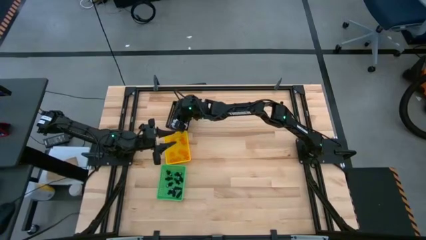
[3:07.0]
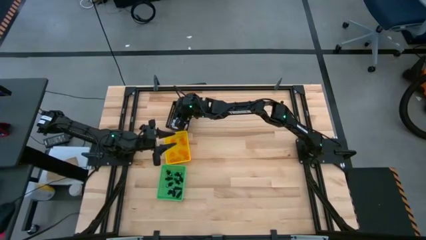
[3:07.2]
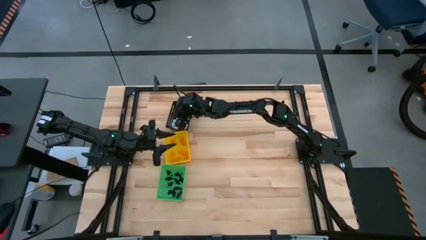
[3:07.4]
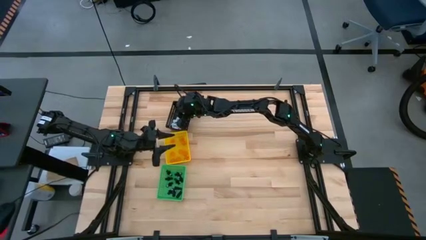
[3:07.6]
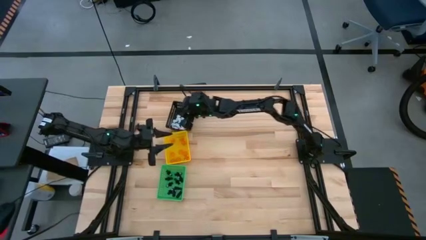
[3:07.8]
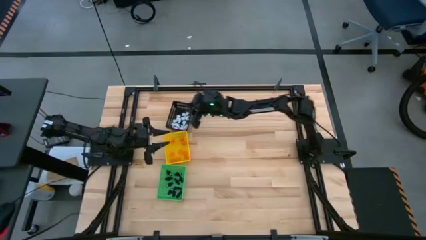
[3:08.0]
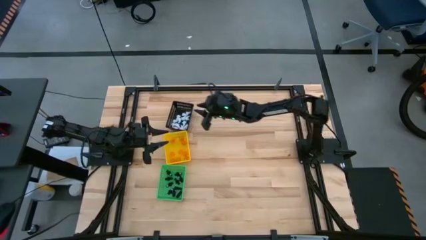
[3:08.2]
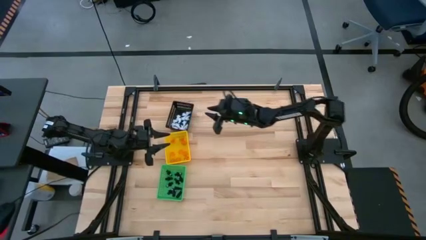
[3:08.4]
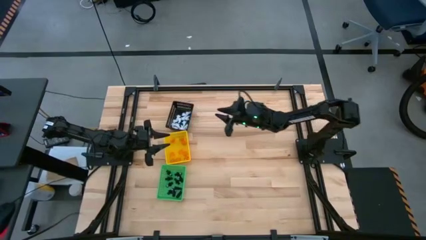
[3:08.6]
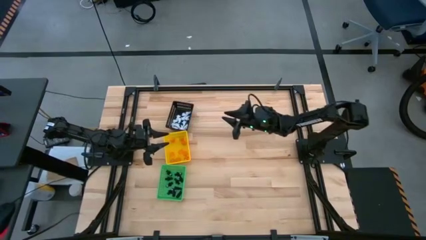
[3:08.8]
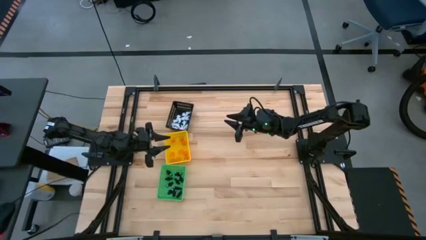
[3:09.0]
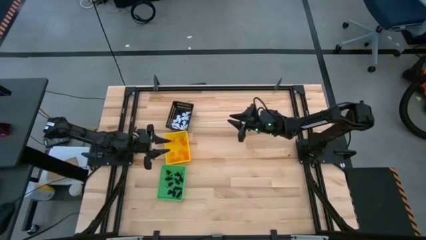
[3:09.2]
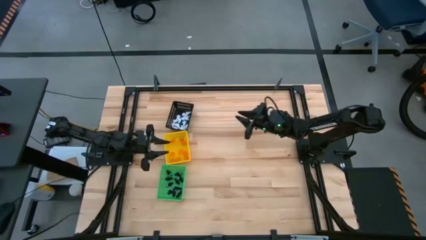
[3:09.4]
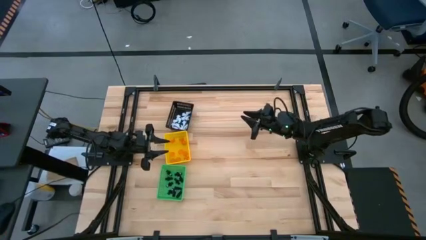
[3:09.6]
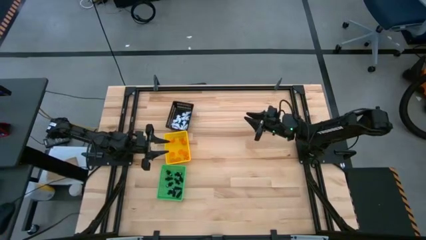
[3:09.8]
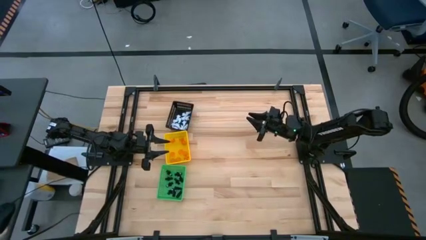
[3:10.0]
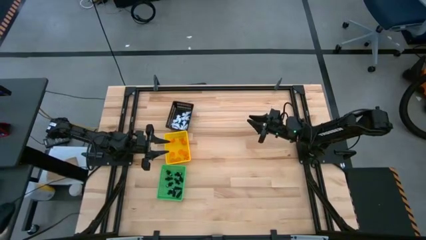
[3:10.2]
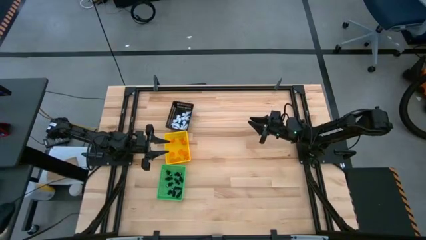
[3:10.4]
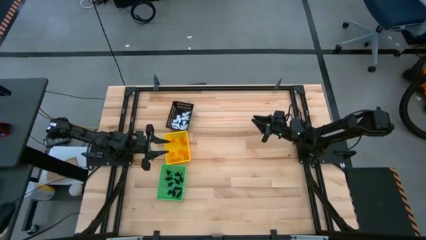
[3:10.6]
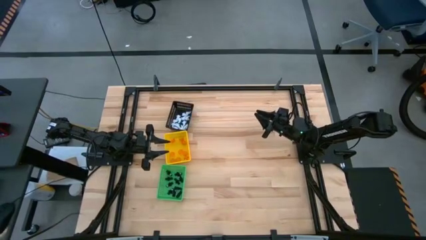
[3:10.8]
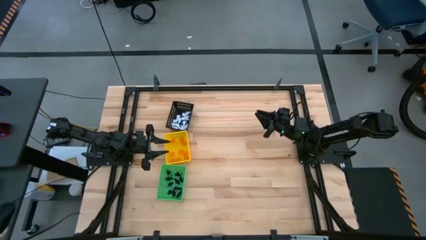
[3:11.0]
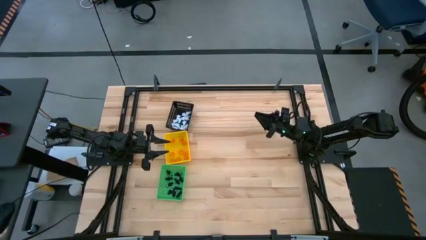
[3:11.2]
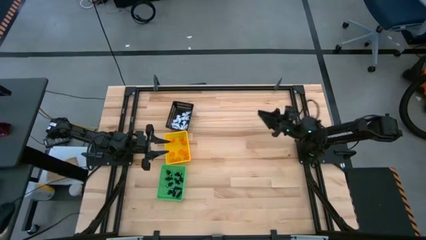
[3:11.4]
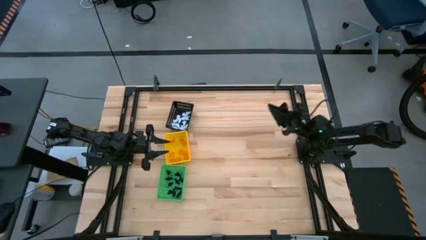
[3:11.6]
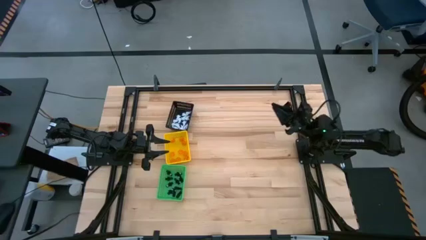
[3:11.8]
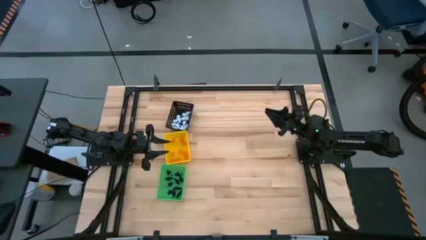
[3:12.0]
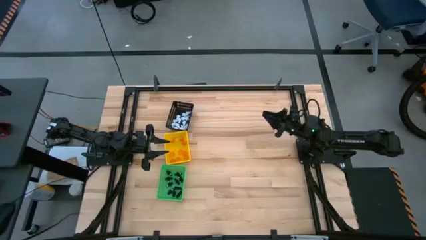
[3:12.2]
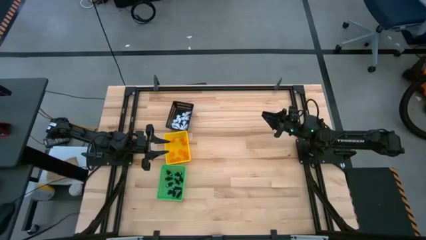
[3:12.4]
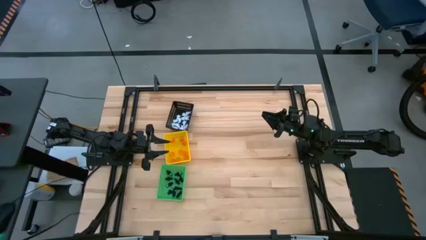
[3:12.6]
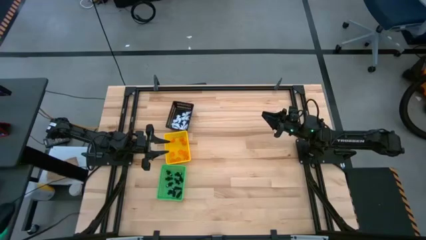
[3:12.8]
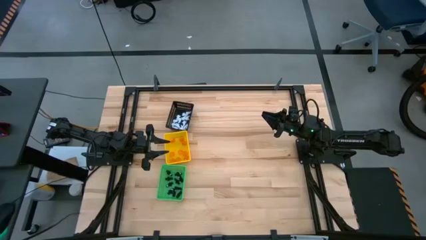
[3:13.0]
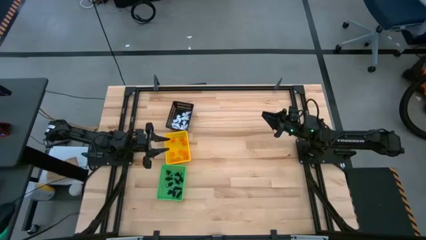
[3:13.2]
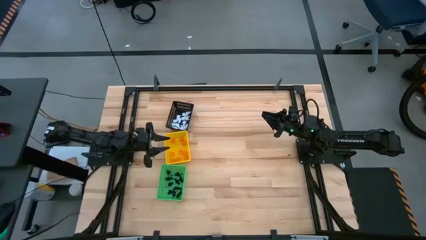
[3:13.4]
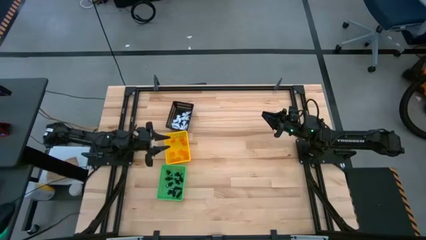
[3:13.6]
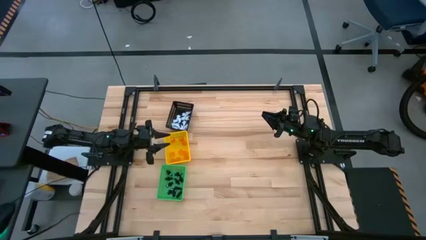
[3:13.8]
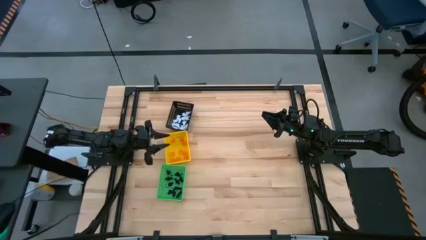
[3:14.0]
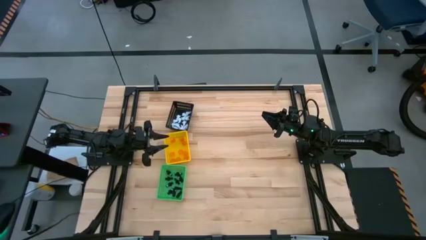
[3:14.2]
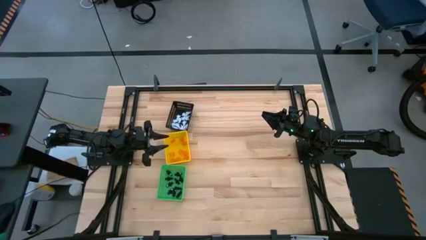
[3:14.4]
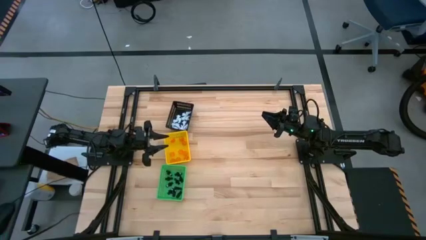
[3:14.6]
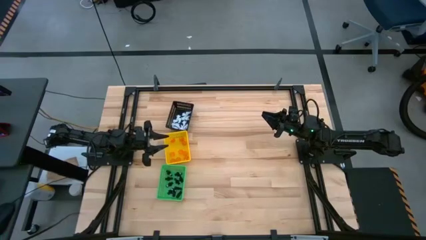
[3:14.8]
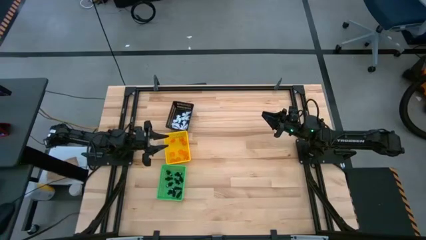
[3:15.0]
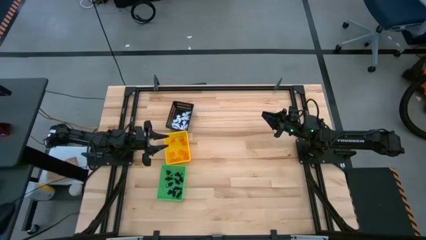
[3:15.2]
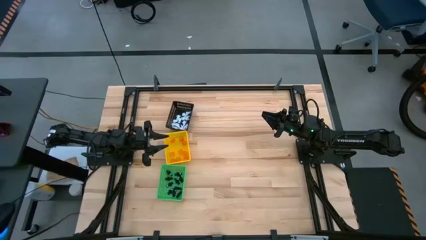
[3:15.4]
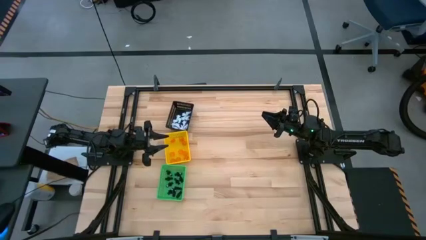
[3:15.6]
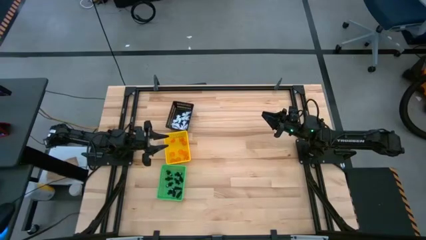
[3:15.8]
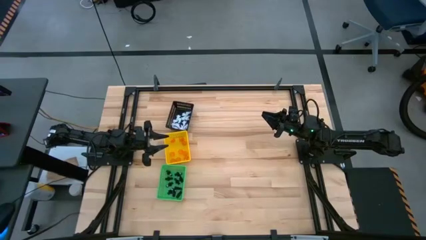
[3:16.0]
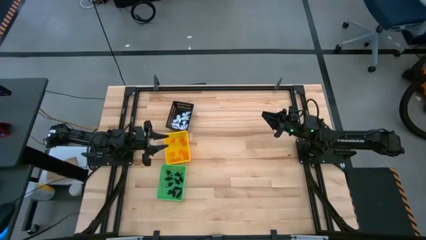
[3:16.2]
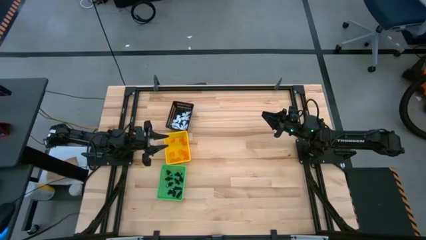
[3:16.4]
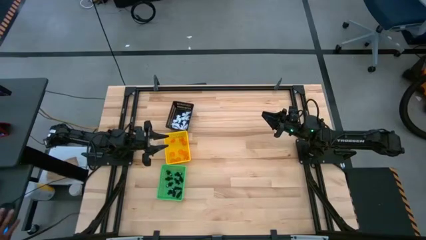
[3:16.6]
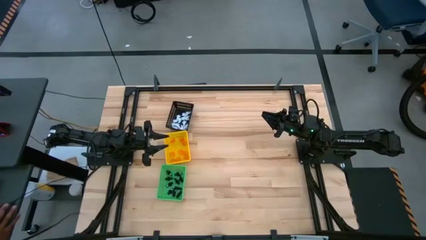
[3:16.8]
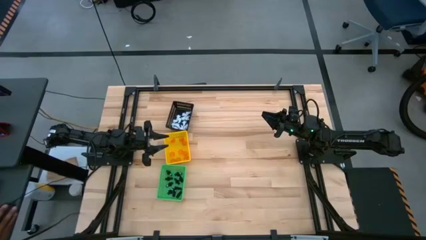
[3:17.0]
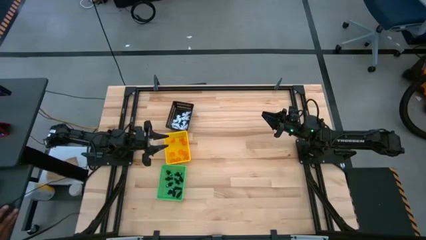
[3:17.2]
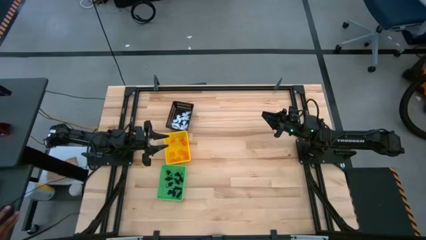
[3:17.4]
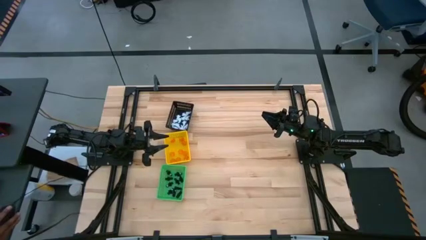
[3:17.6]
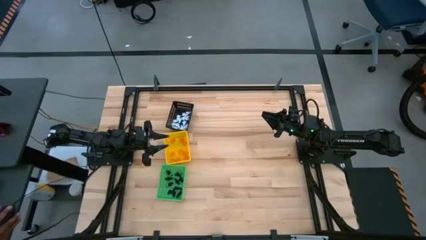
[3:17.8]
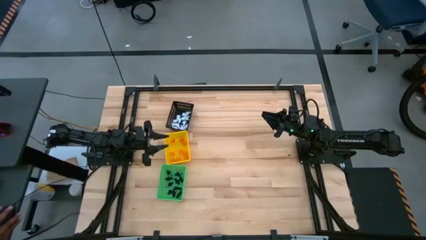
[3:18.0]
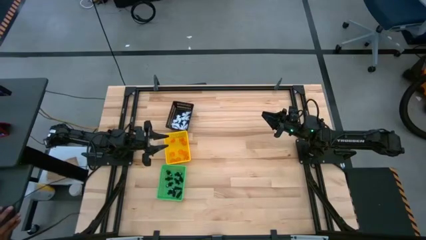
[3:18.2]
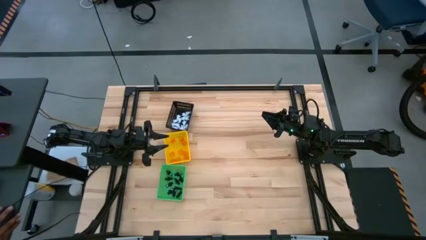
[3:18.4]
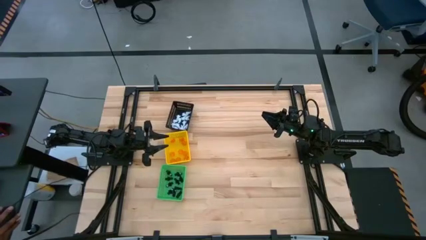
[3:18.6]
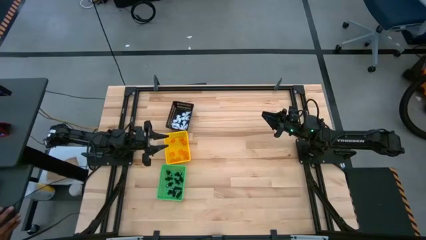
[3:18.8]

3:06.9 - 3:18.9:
Task: Sort Halloween decoration
Return to Home Position
